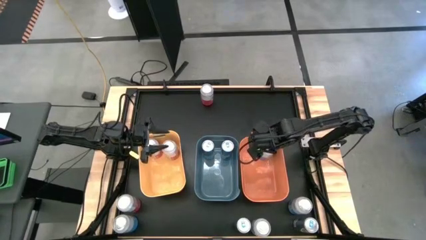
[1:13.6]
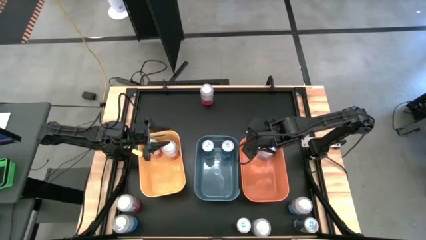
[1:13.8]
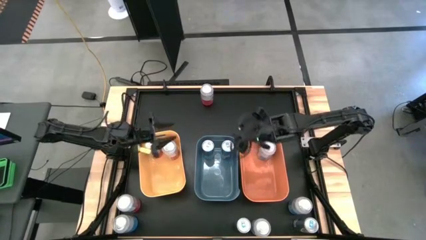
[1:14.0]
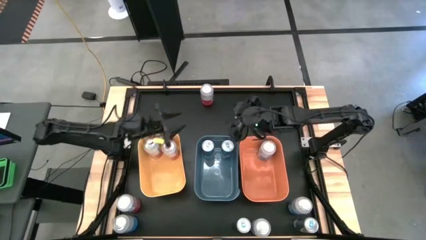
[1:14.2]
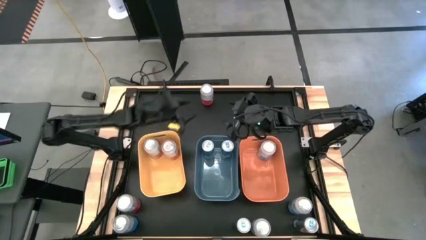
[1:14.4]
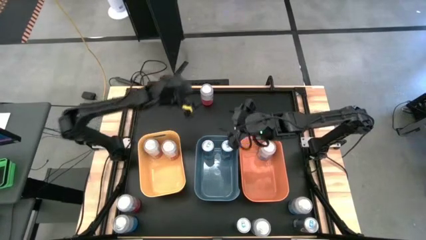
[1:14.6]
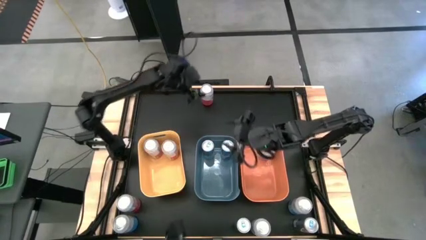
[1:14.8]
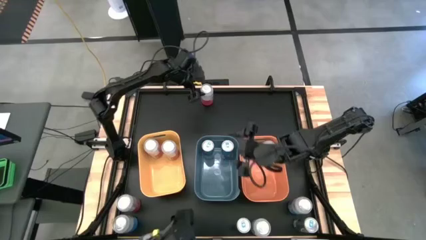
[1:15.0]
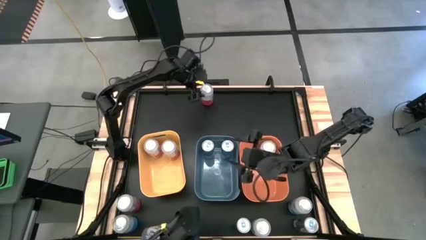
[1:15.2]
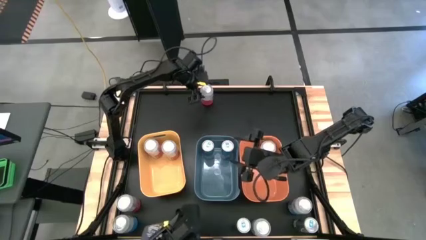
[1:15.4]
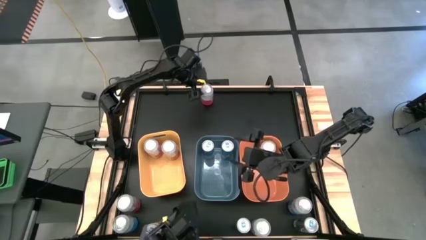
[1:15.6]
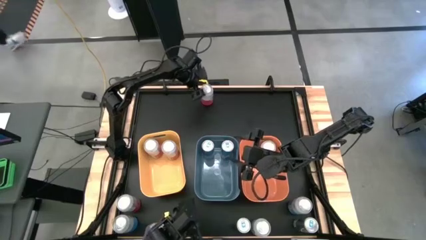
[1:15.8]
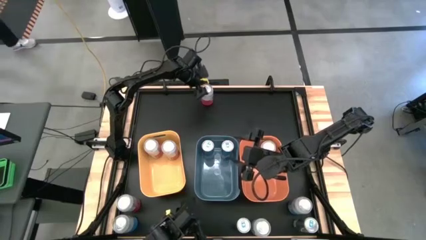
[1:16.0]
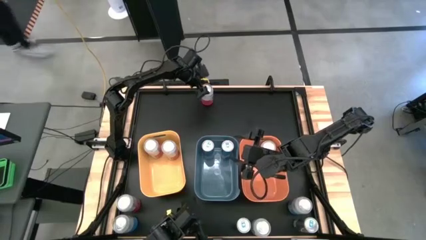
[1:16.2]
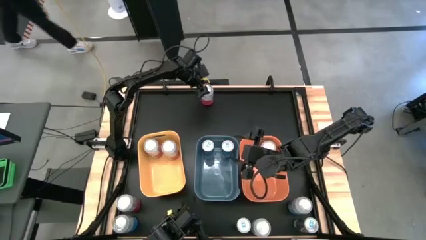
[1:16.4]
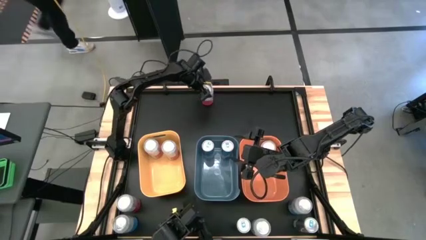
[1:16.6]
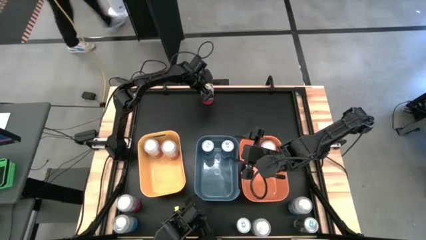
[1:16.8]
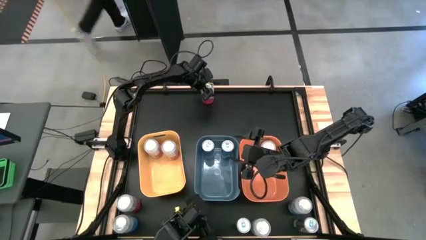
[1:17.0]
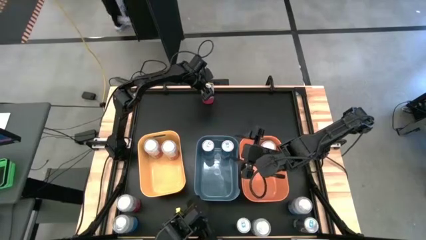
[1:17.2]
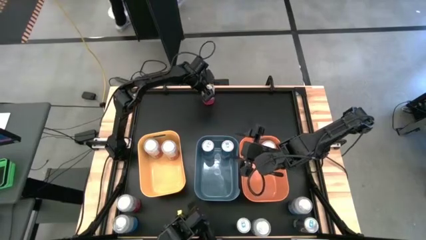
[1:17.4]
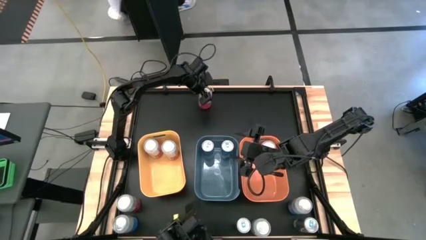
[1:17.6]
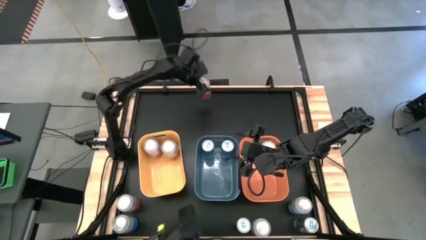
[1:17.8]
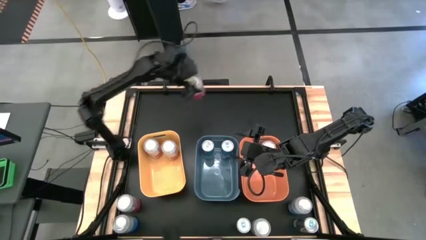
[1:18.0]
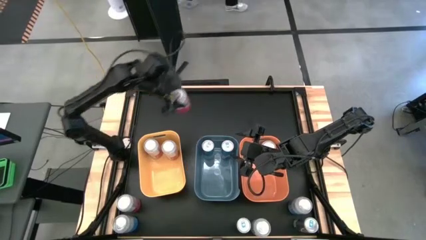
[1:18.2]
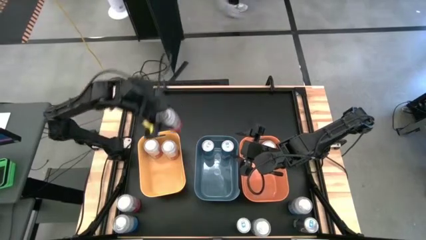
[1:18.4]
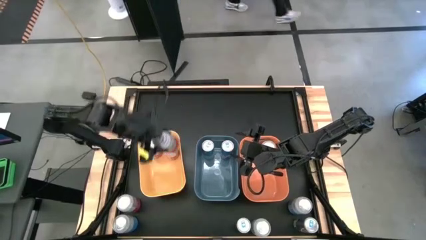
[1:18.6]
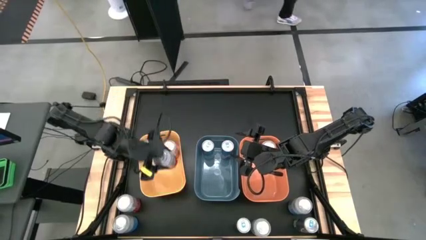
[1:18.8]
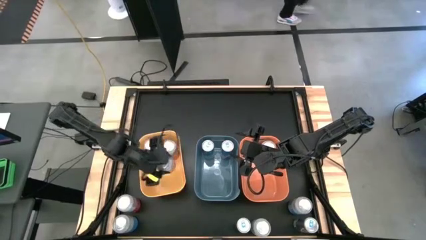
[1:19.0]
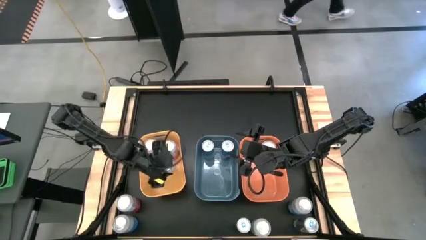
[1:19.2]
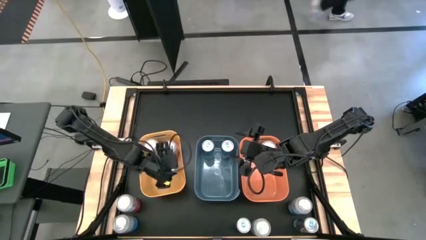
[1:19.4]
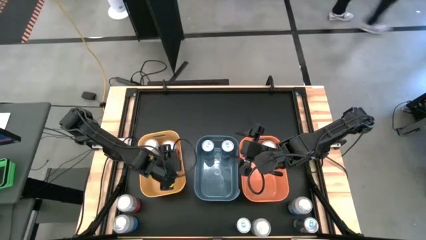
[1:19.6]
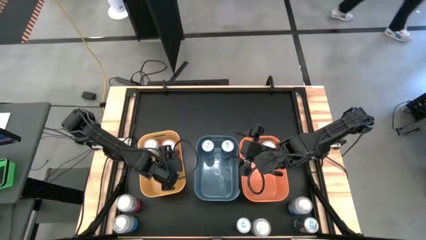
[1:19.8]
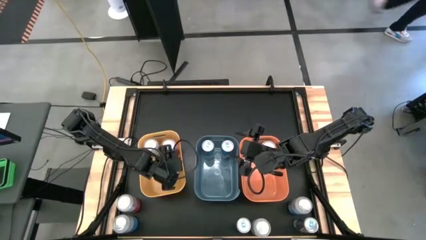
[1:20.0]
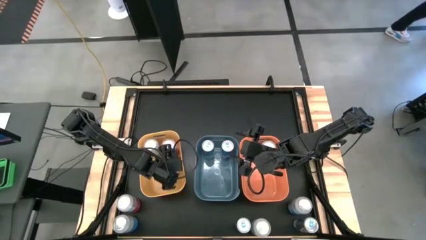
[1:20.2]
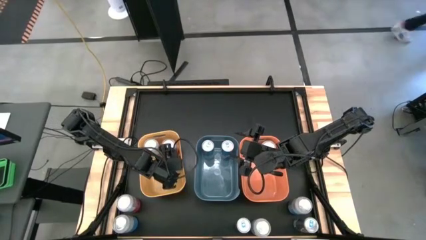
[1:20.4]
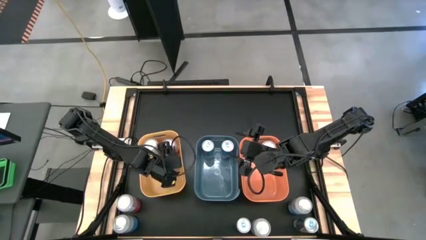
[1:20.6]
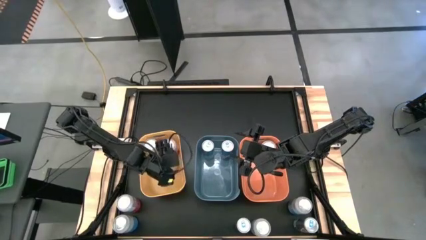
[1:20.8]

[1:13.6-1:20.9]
Task: Sort soda cans
Put the top pink-white soda can into the yellow bin

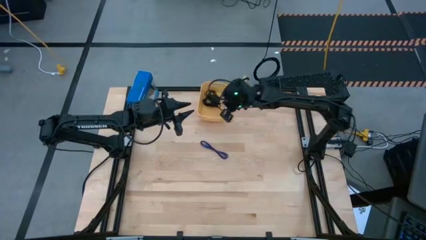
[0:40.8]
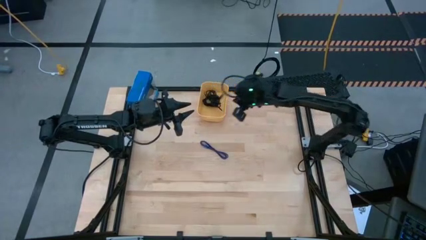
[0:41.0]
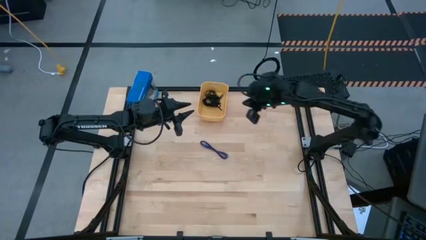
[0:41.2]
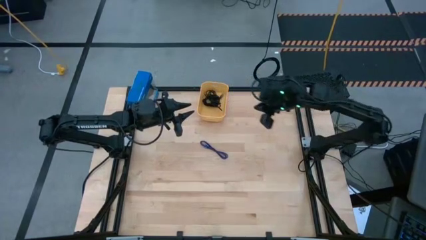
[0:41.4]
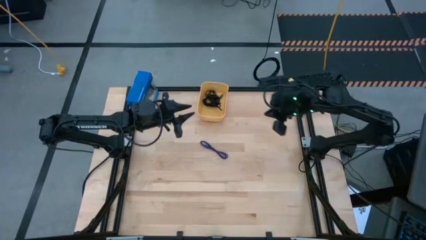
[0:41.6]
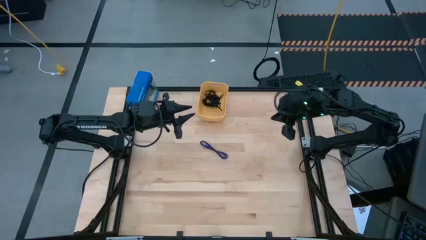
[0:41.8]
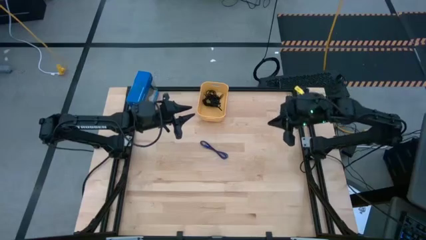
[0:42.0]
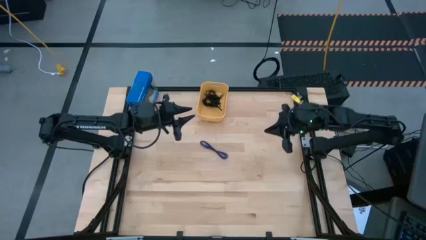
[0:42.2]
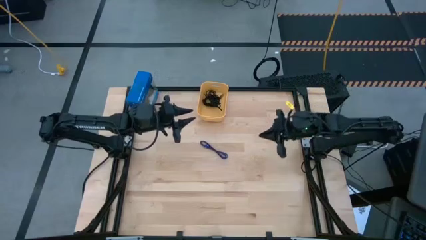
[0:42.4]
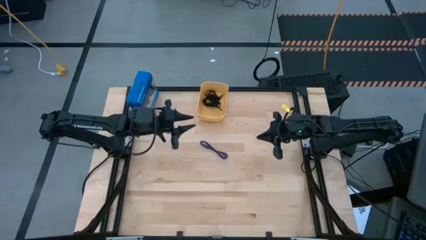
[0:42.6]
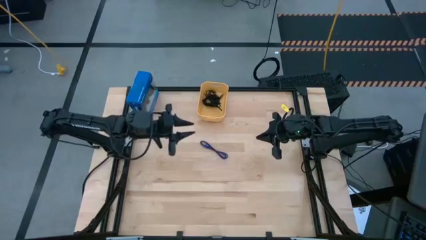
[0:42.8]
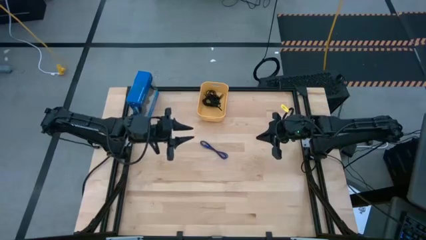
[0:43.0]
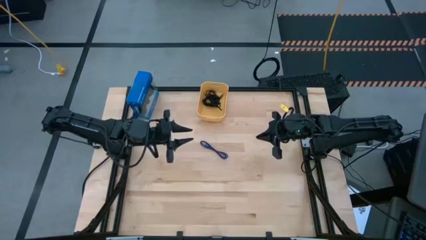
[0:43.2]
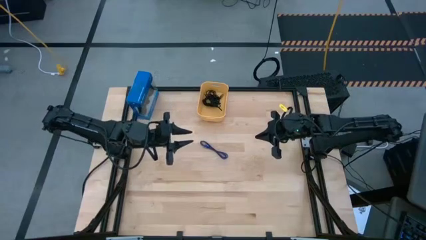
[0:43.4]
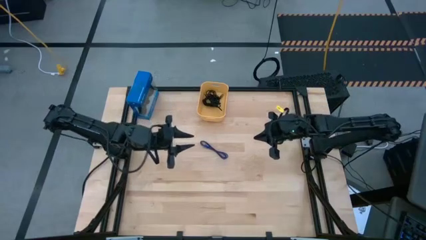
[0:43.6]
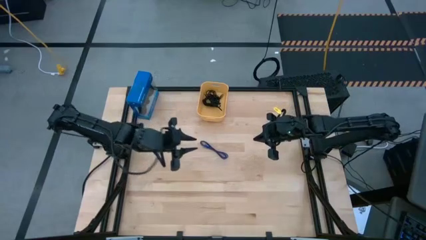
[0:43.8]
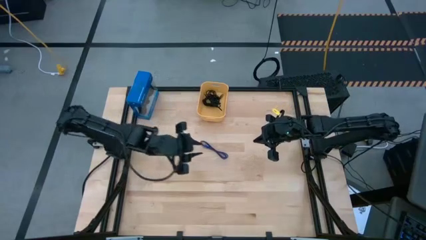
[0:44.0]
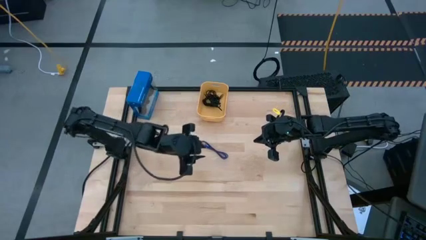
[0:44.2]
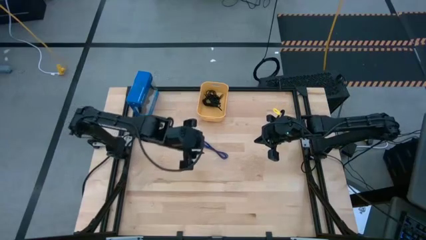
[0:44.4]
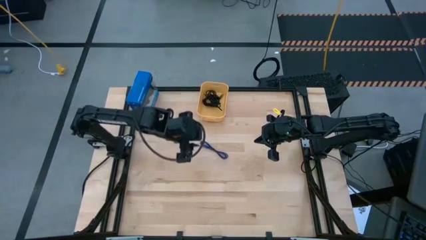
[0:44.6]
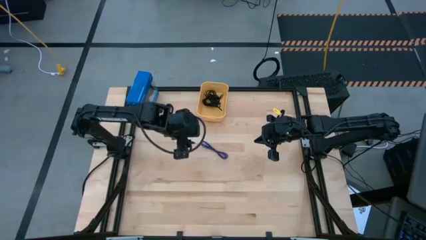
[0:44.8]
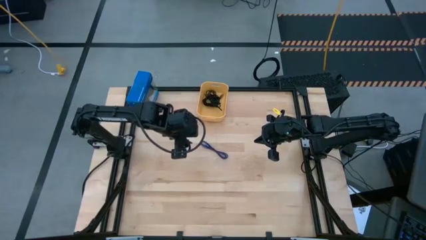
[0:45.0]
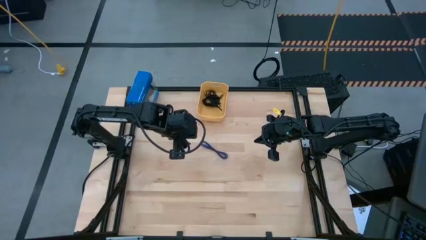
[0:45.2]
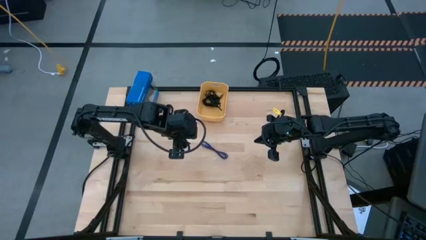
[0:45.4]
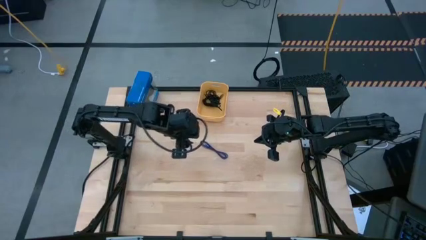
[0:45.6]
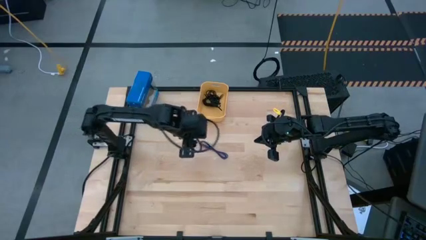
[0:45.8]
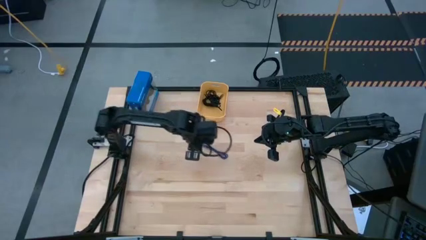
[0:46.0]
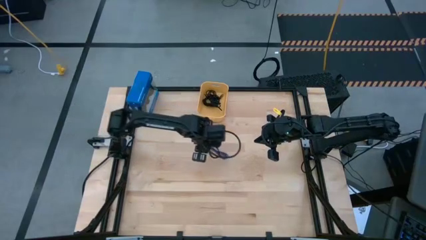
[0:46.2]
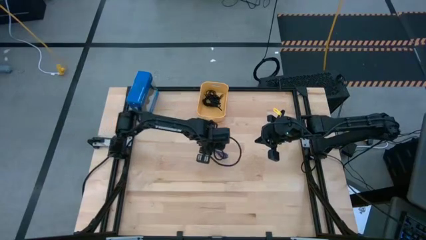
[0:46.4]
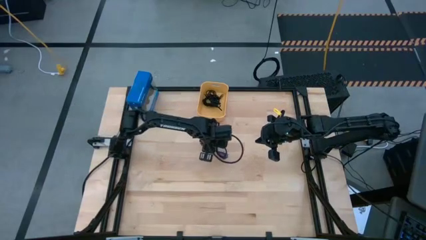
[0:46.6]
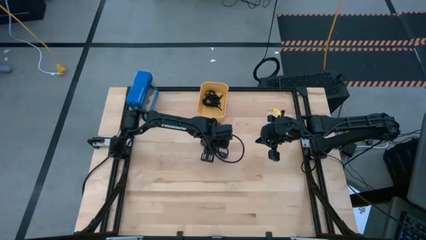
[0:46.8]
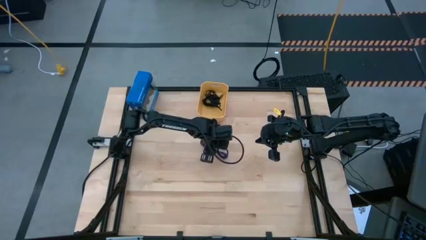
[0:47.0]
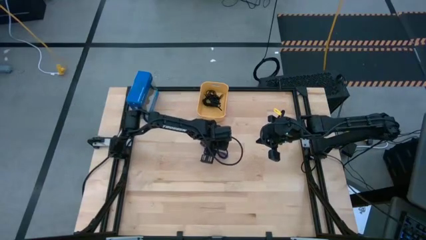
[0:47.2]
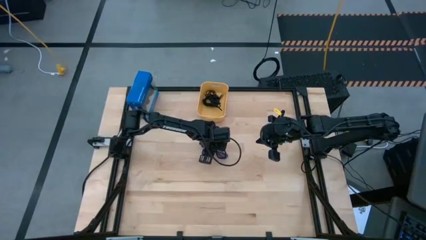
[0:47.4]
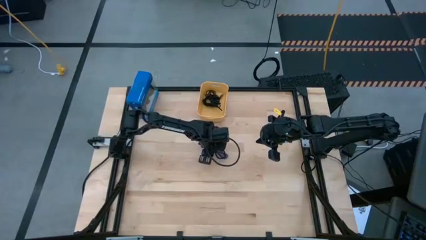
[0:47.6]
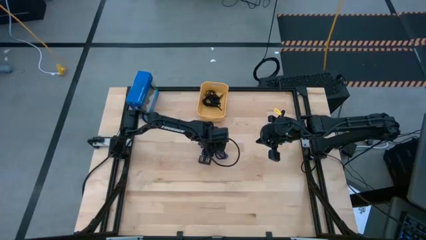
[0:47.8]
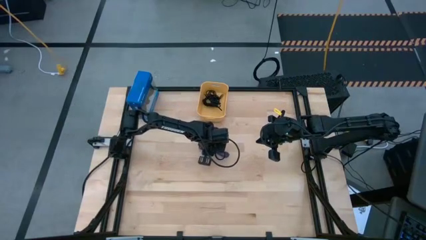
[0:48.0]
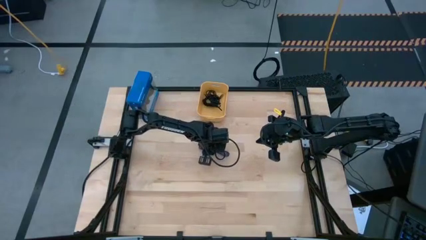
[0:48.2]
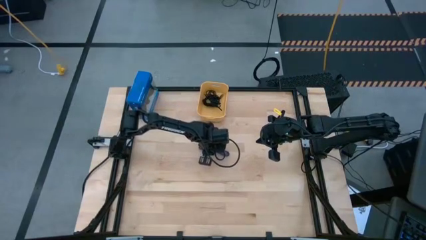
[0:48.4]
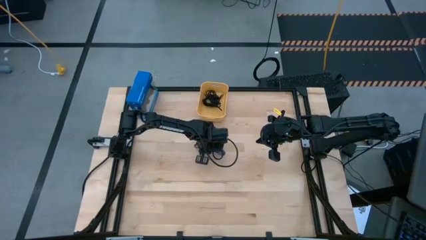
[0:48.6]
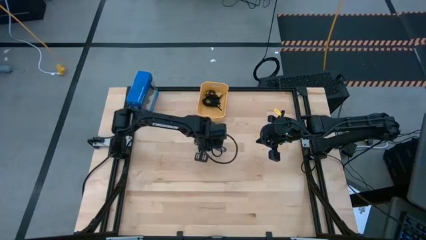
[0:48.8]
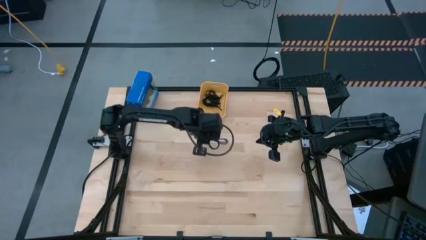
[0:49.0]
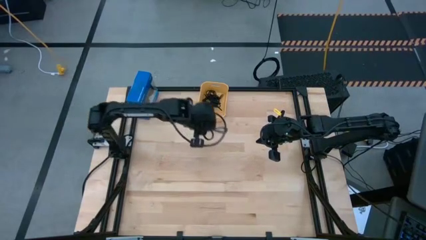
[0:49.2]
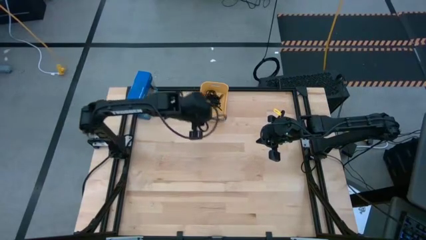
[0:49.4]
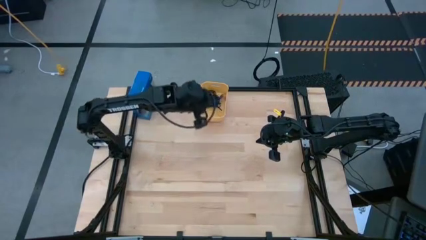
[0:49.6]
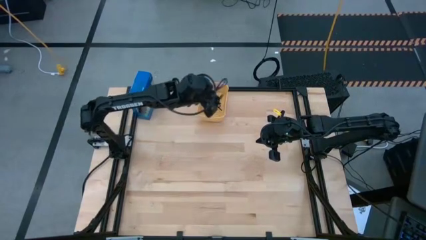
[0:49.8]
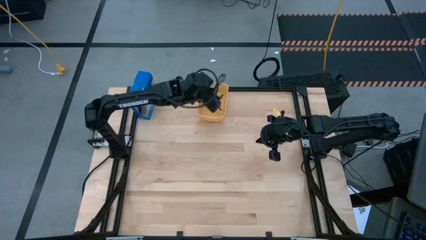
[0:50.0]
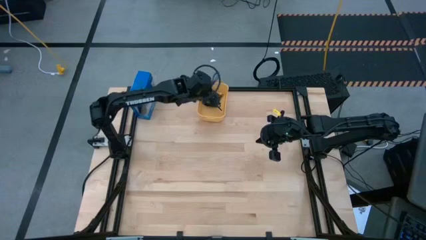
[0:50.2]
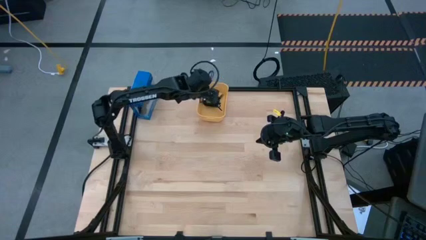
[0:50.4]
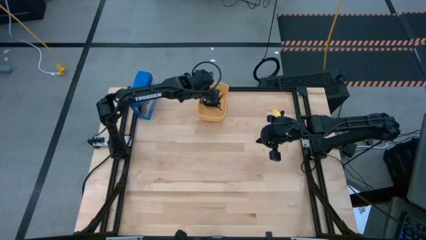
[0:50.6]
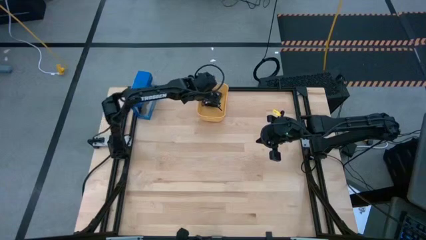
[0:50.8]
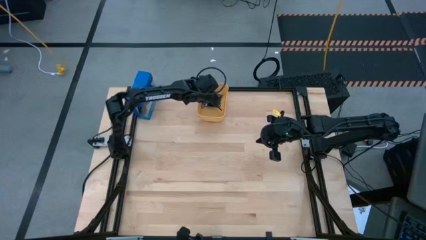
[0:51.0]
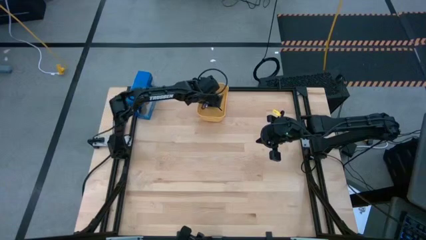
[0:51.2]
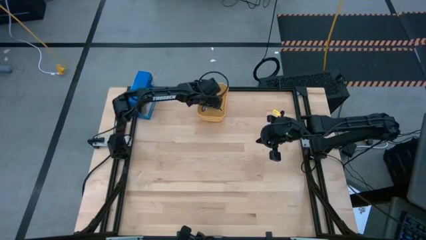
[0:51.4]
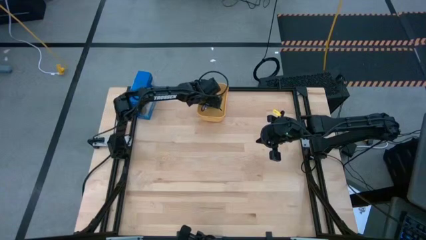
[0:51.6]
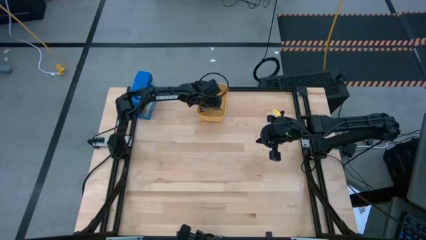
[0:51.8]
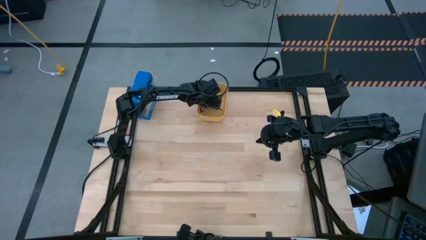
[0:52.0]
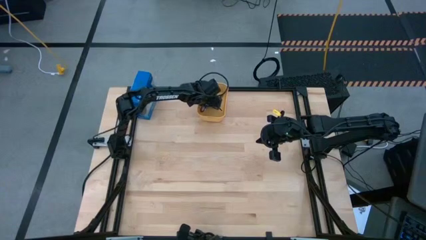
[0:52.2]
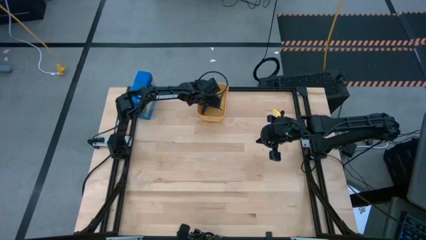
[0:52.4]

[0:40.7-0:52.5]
Task: Pick and place USB-C Cables
Put the violet charger cable into the yellow bin
